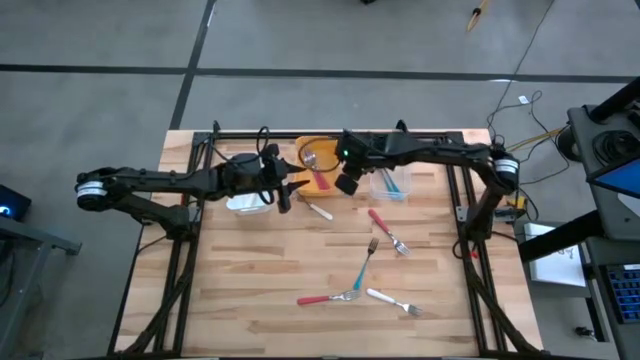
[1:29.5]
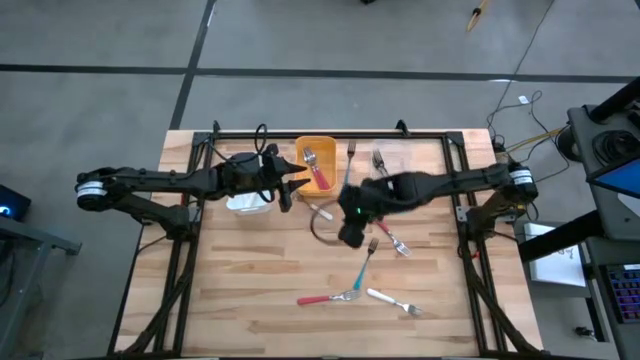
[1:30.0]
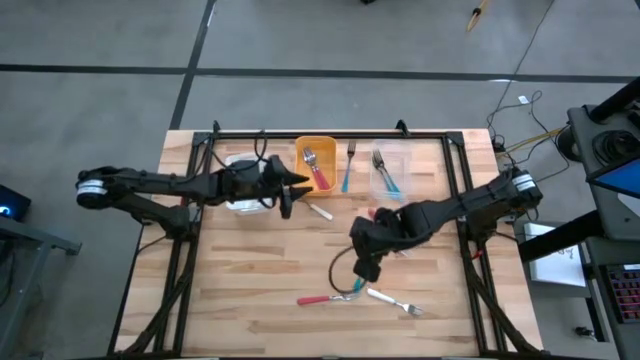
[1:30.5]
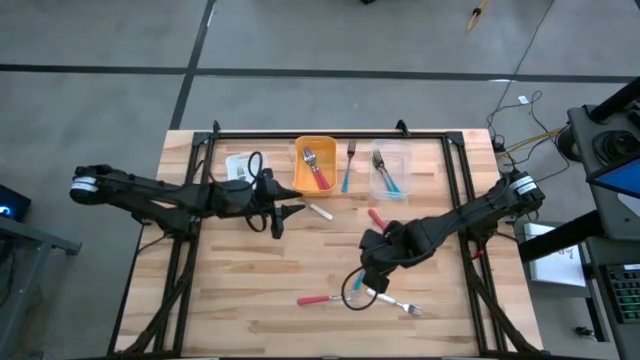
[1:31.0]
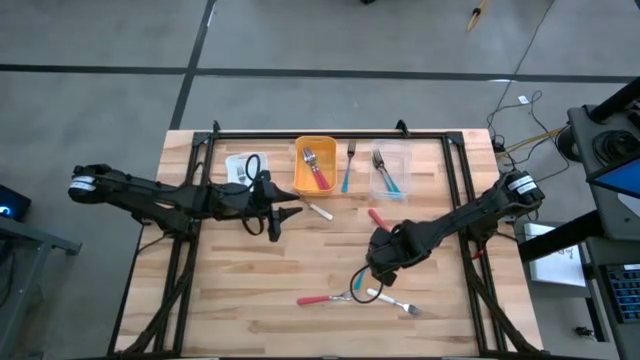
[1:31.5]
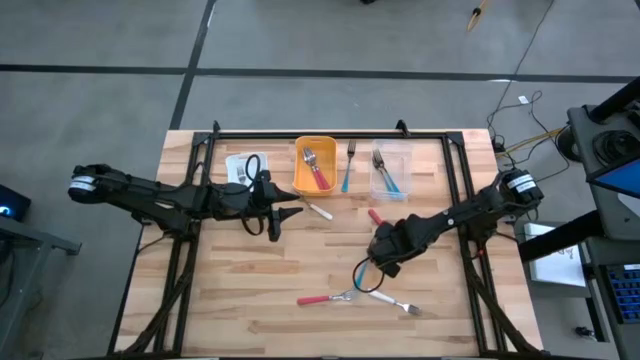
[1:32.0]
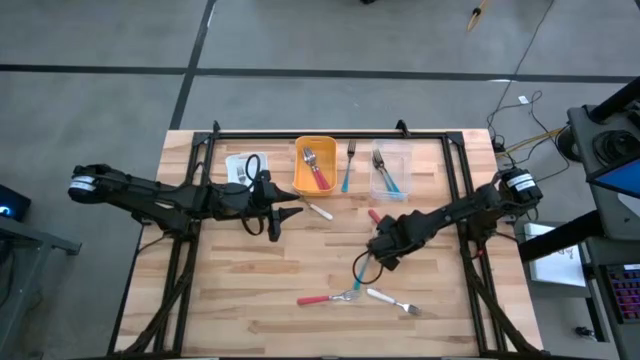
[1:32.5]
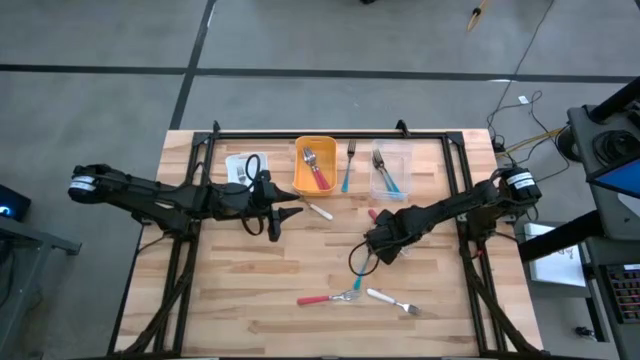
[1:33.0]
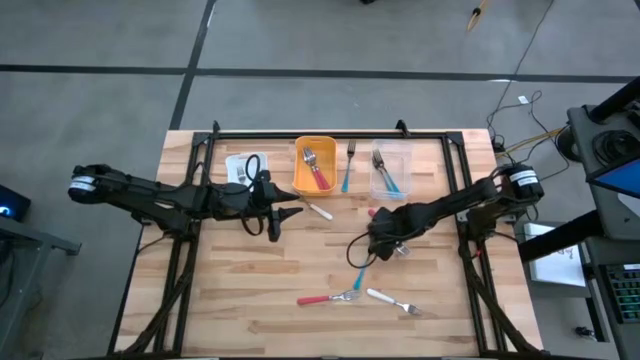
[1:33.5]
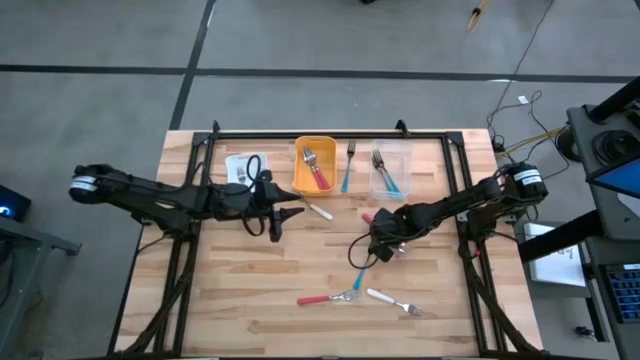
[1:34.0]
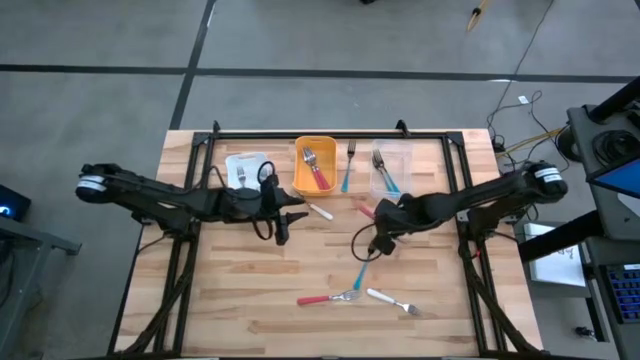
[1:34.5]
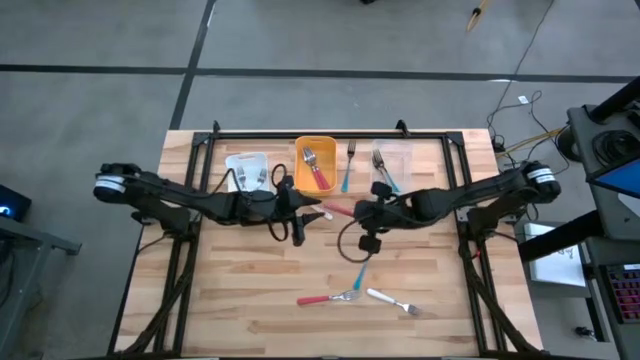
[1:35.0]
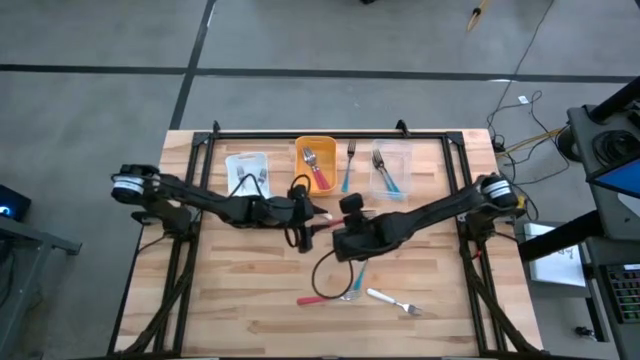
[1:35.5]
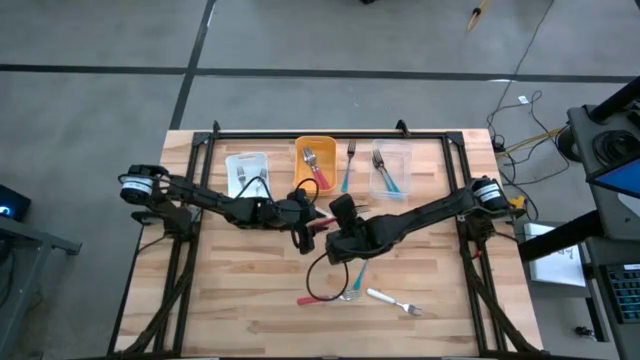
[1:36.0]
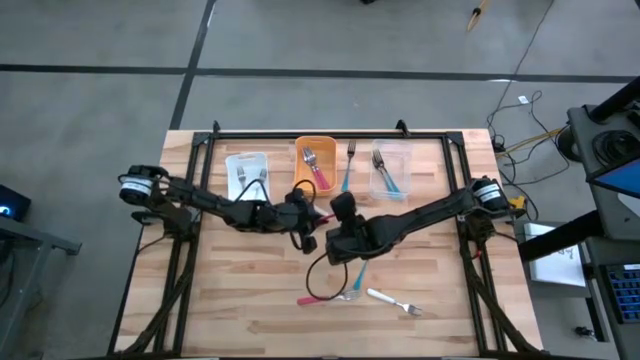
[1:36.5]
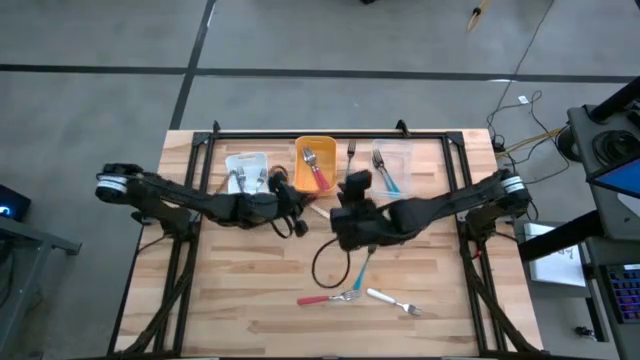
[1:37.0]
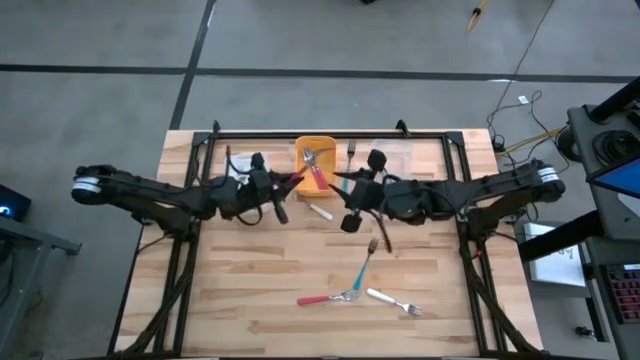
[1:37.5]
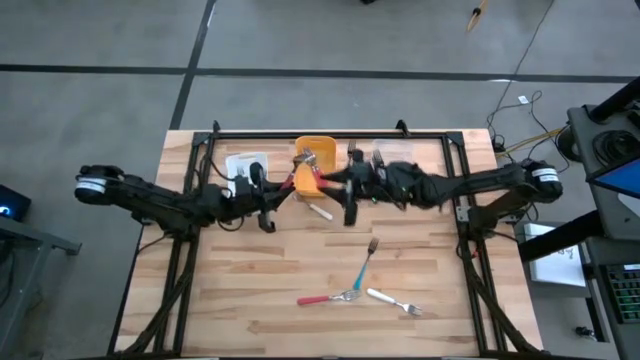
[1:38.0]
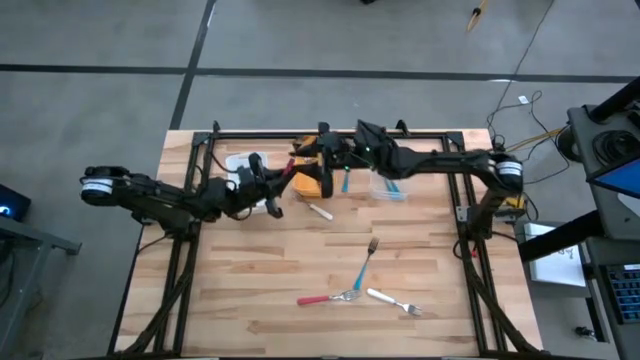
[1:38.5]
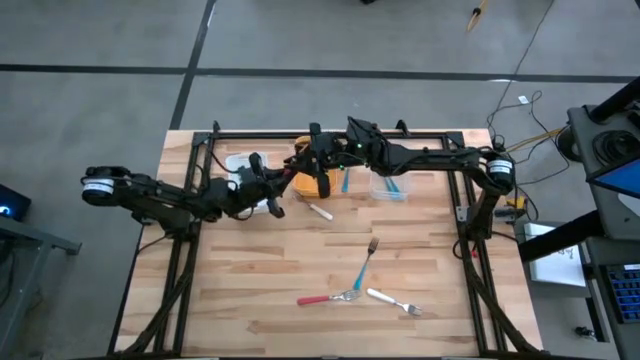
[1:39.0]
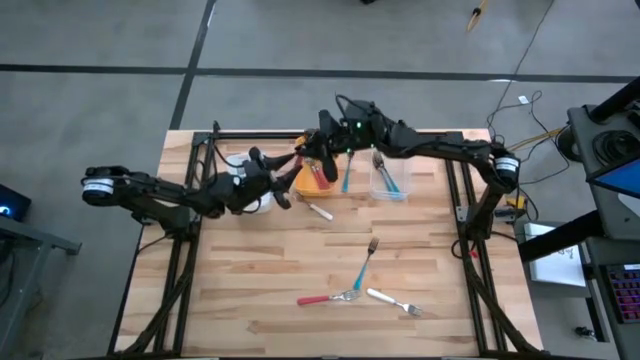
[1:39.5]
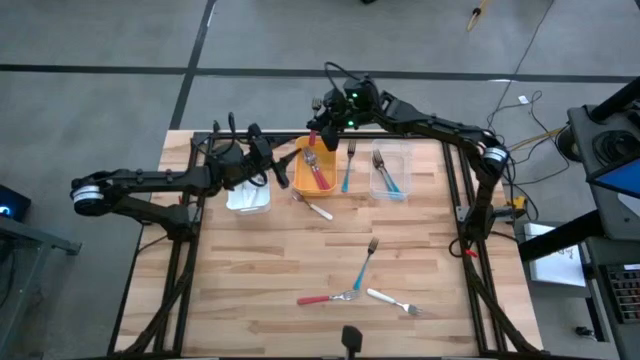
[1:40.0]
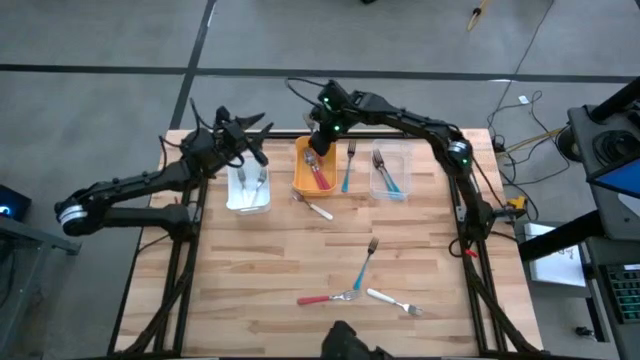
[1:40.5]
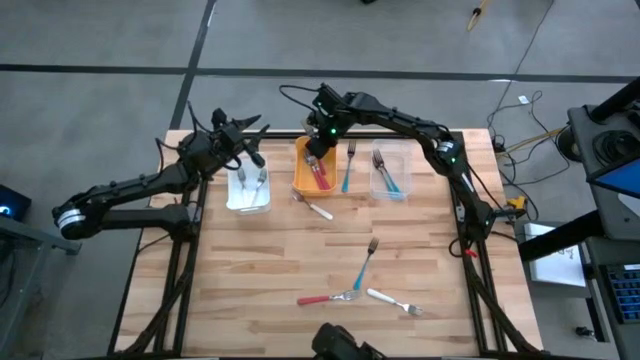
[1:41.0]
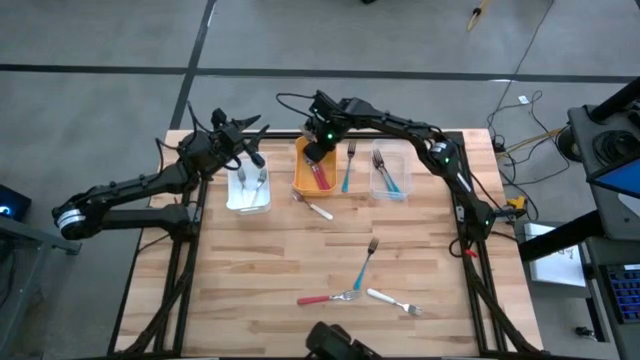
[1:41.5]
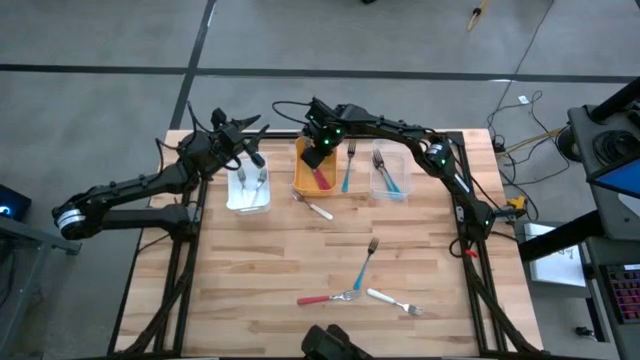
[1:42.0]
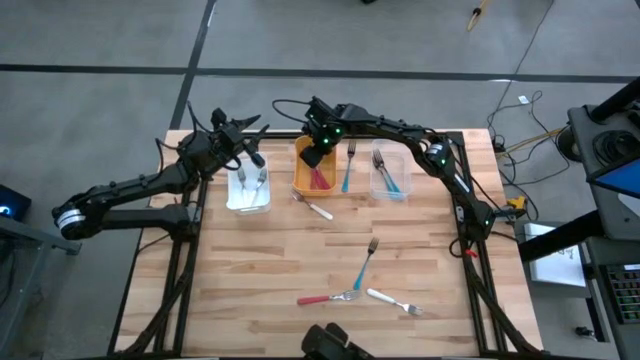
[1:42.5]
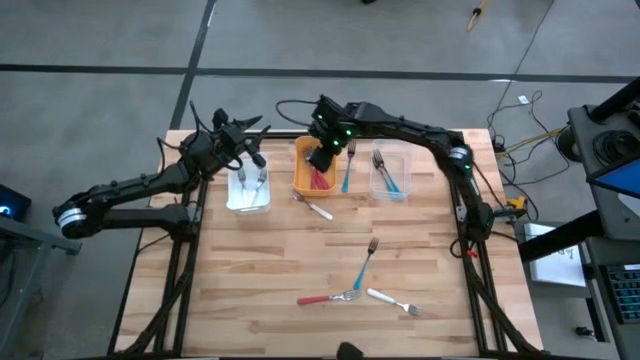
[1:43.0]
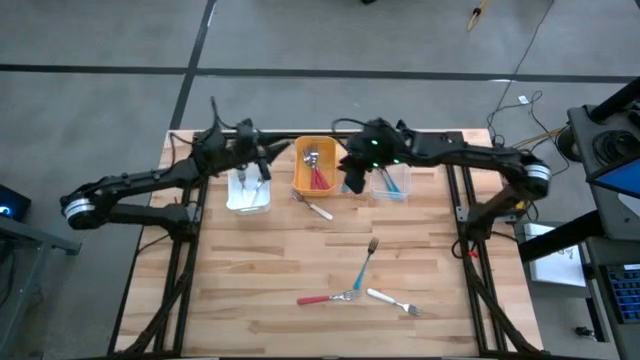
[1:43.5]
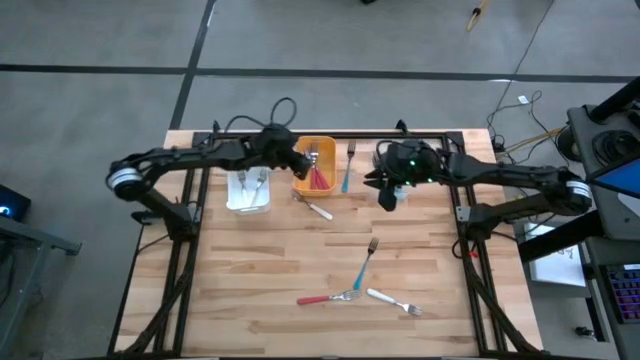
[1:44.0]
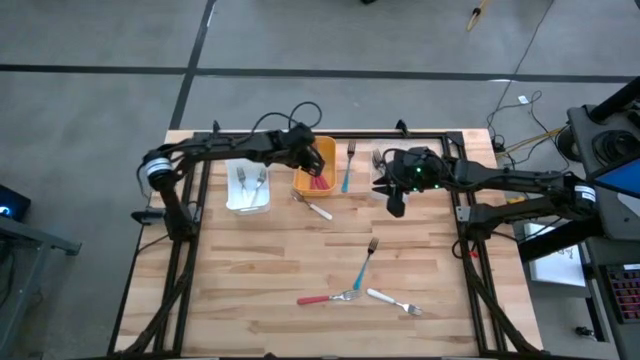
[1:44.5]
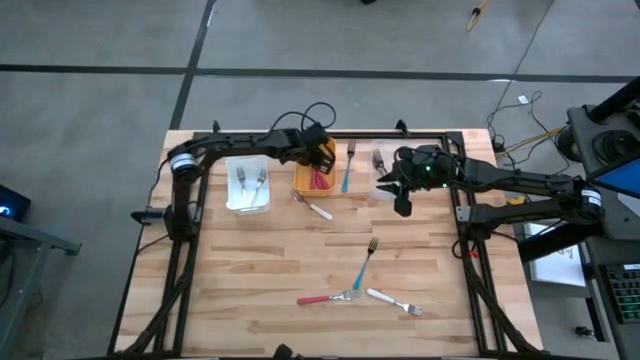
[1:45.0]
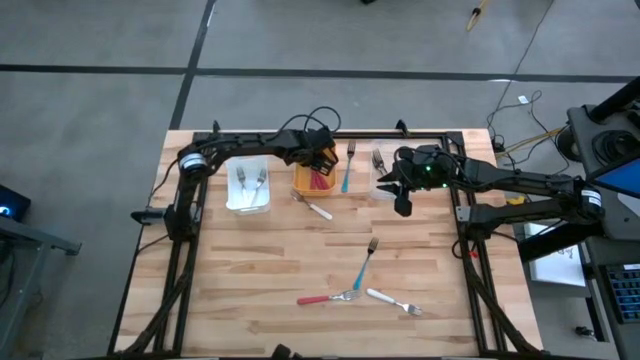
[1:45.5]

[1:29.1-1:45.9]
Task: Sort silverware by color (type)
Put the pink fork into the yellow bin

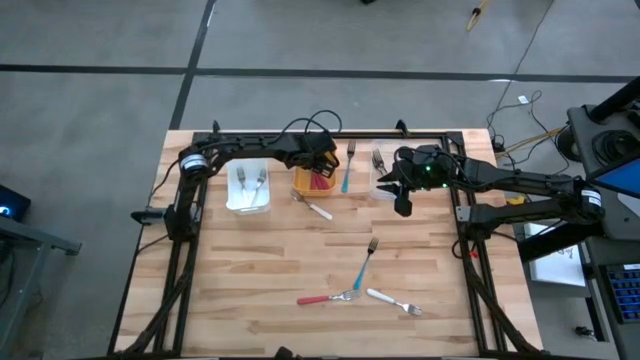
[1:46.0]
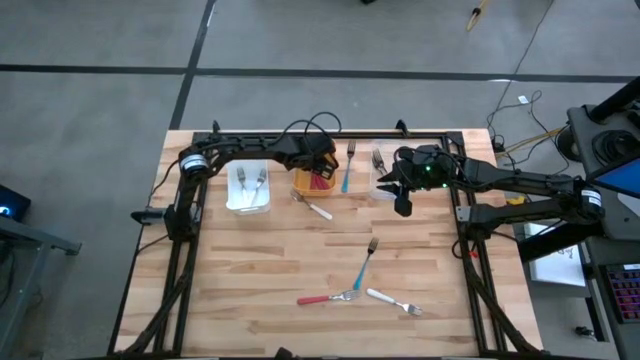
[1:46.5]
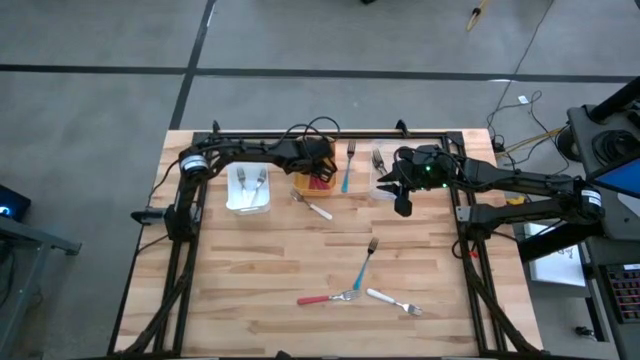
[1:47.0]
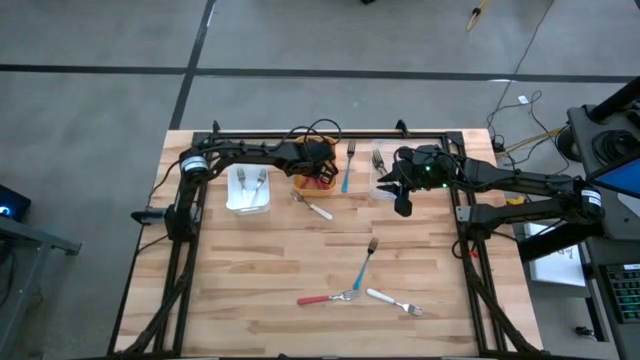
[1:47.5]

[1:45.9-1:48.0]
Put the pink fork into the yellow bin

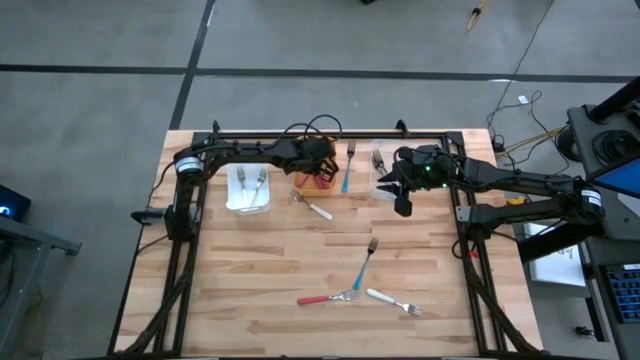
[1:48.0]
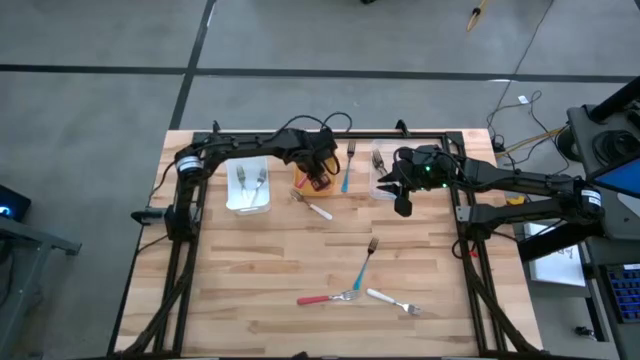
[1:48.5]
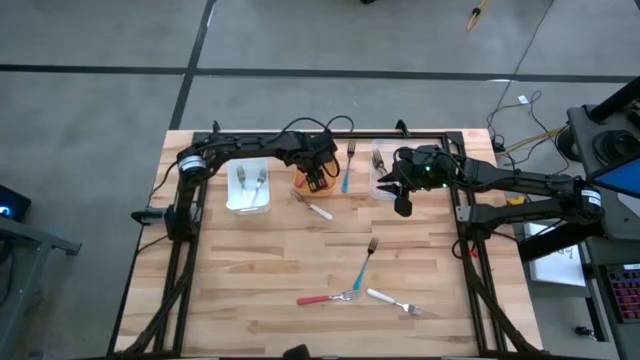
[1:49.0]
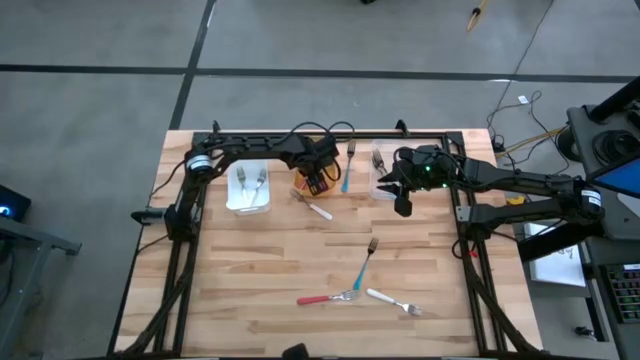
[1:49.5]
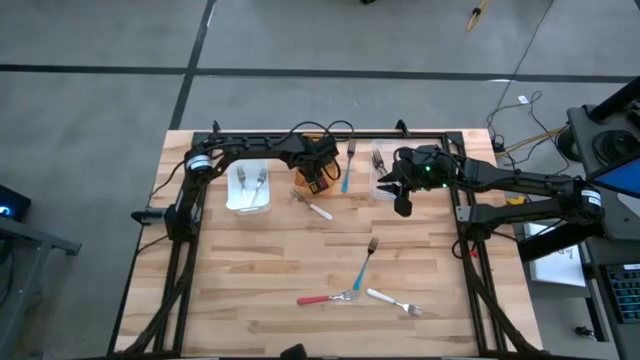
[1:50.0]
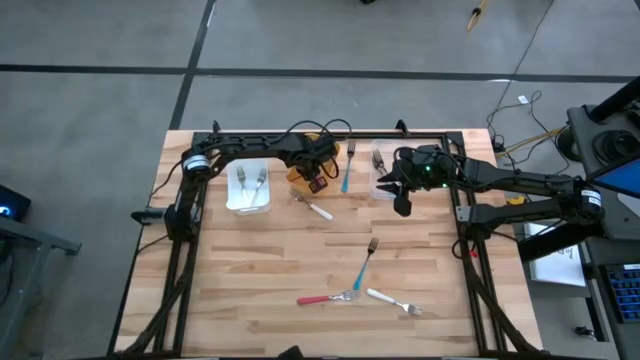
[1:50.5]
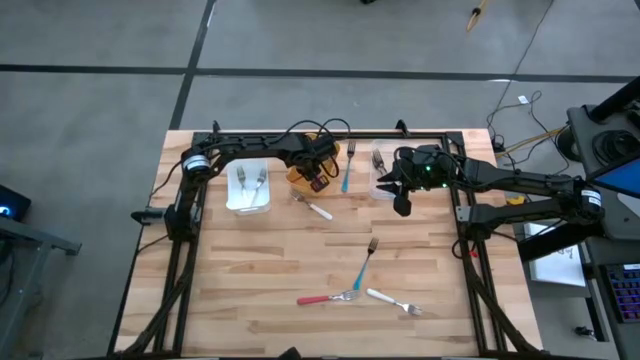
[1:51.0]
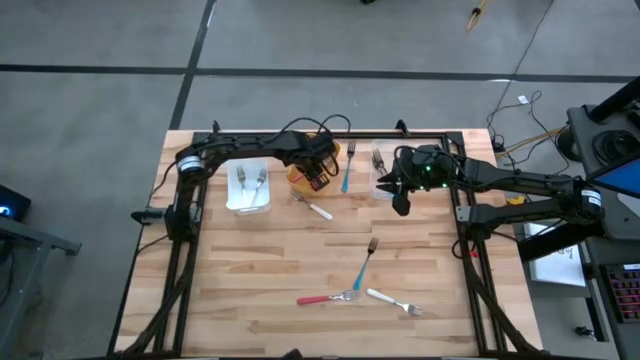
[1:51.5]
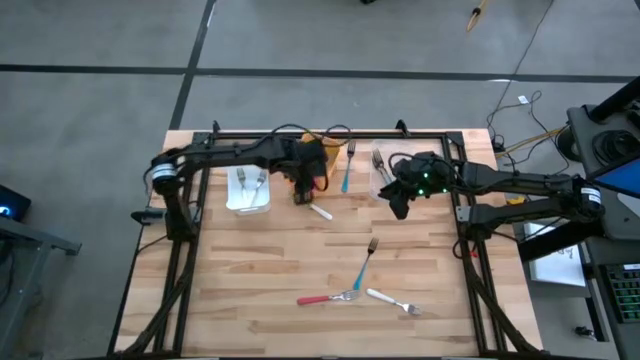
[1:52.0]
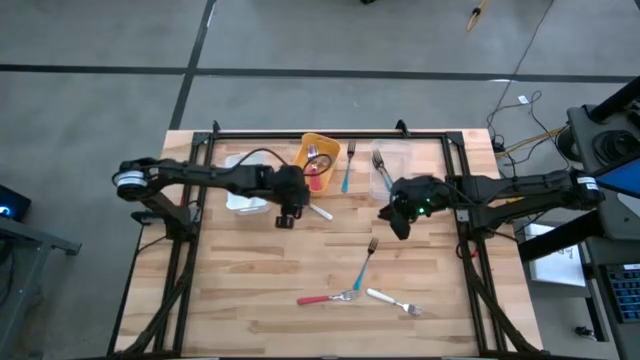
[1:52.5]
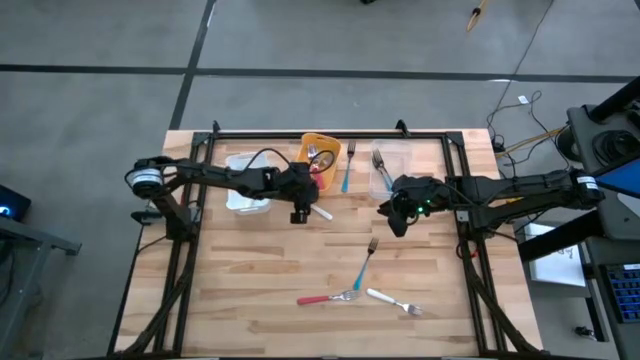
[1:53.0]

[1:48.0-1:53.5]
Put the pink fork into the yellow bin
